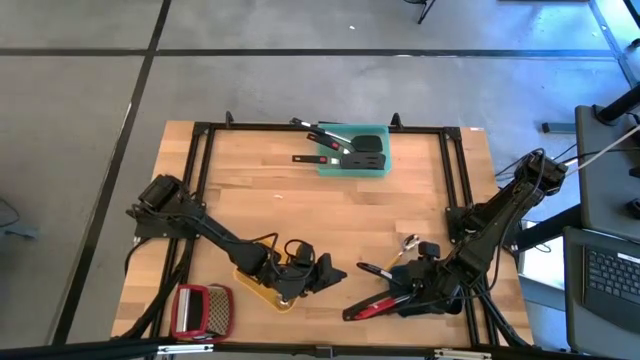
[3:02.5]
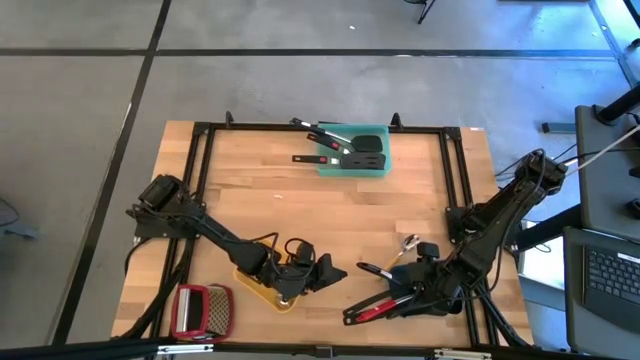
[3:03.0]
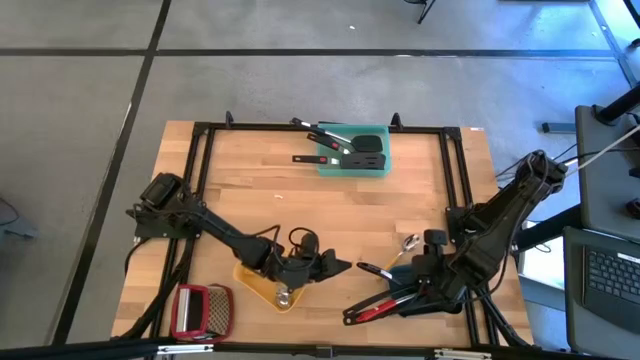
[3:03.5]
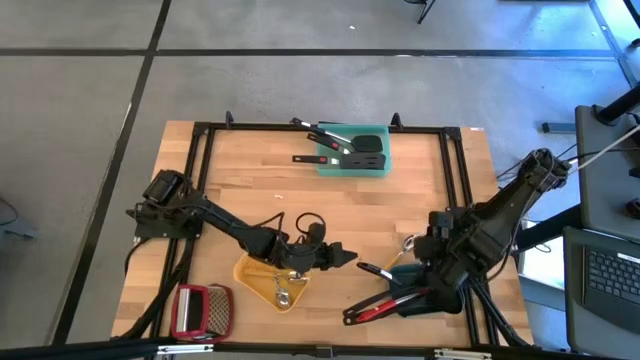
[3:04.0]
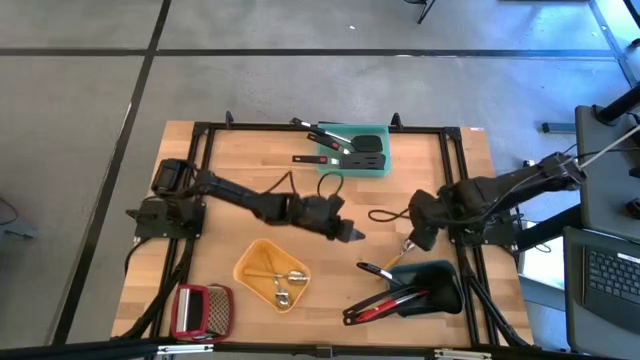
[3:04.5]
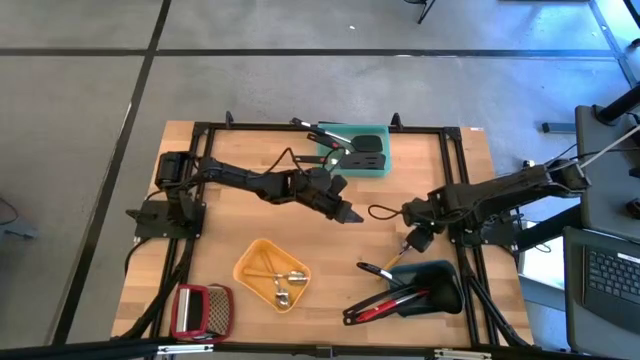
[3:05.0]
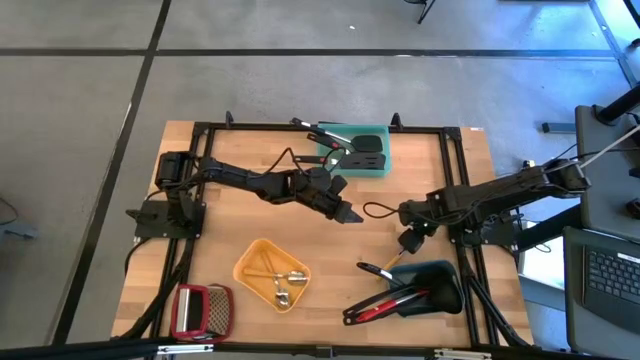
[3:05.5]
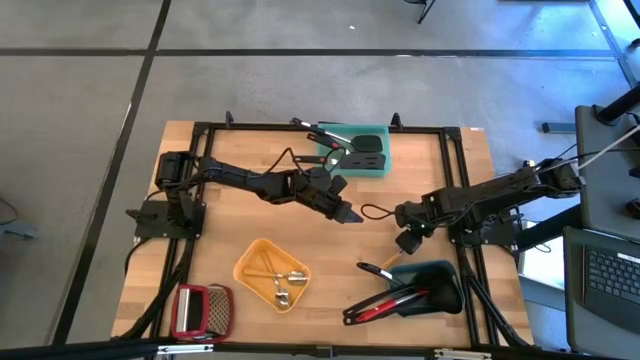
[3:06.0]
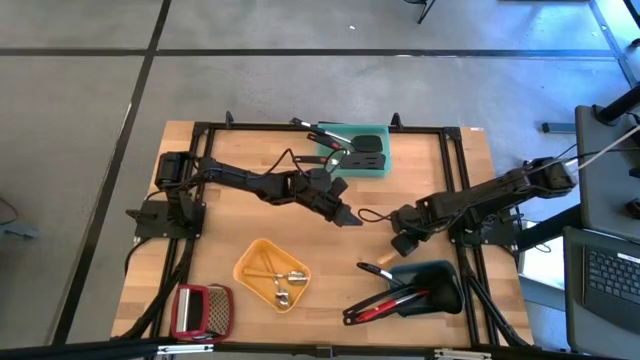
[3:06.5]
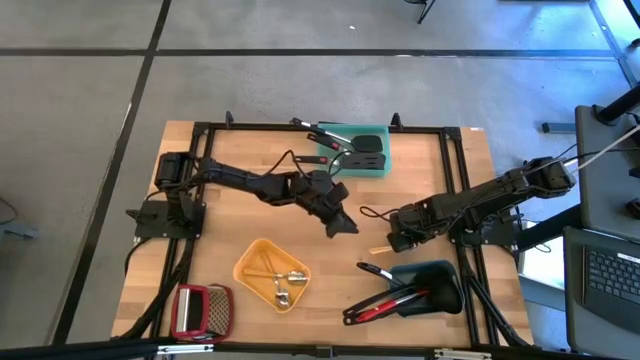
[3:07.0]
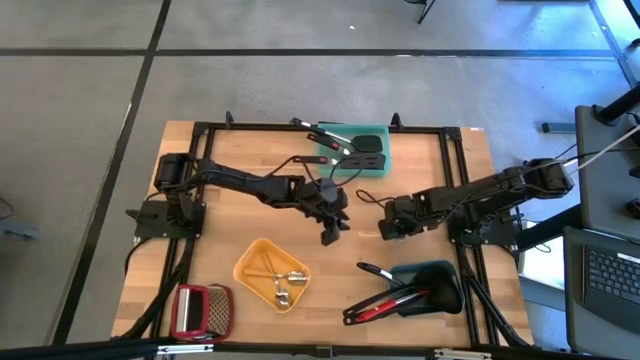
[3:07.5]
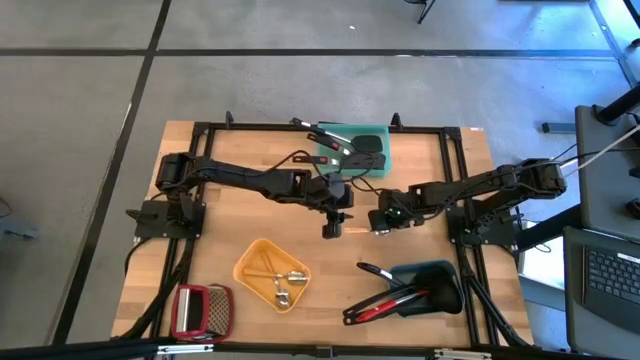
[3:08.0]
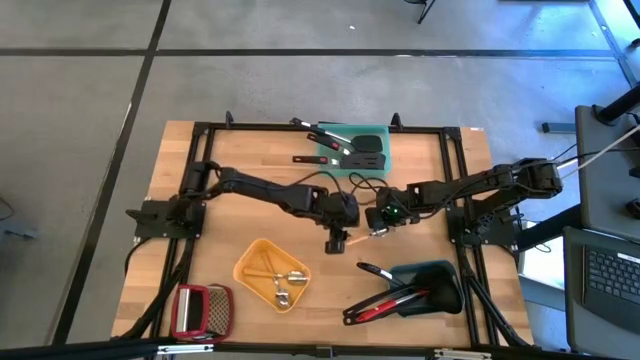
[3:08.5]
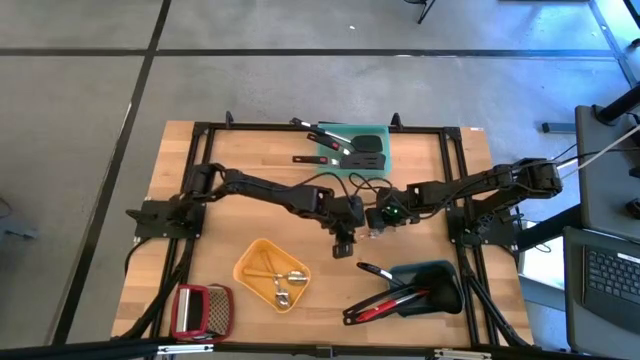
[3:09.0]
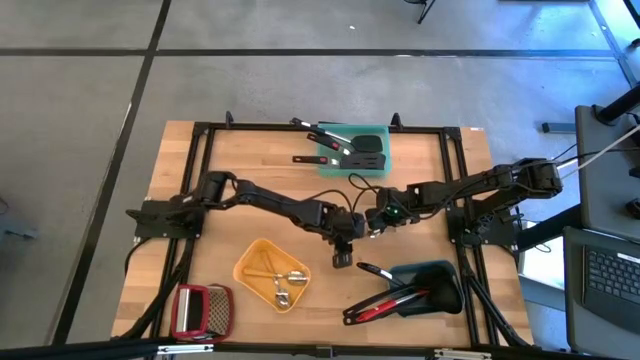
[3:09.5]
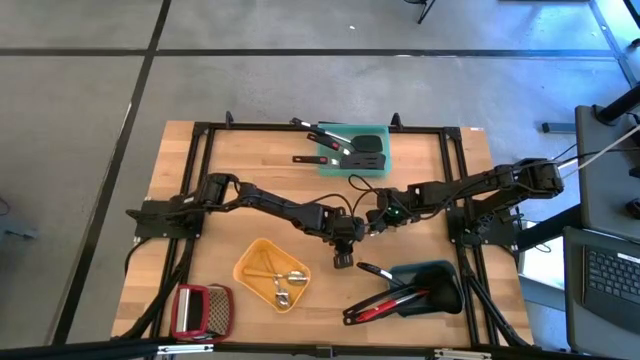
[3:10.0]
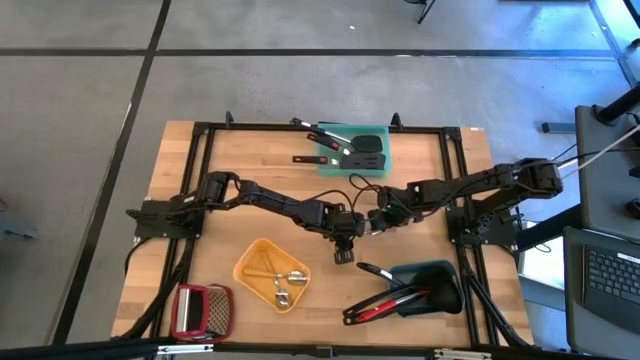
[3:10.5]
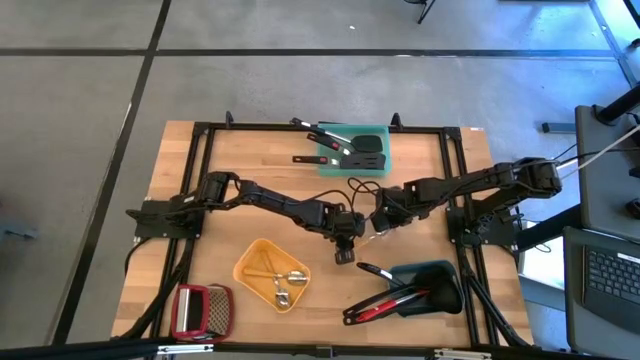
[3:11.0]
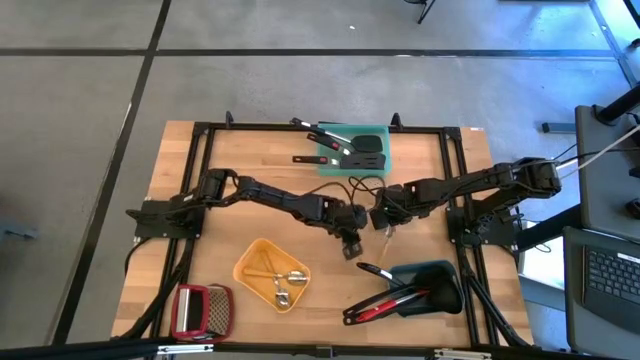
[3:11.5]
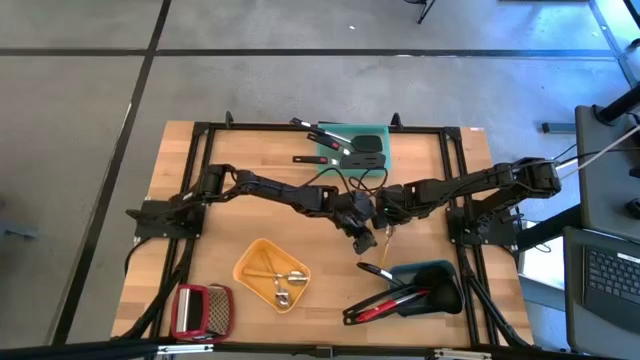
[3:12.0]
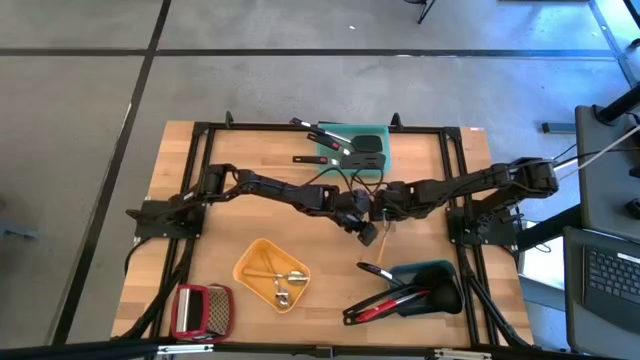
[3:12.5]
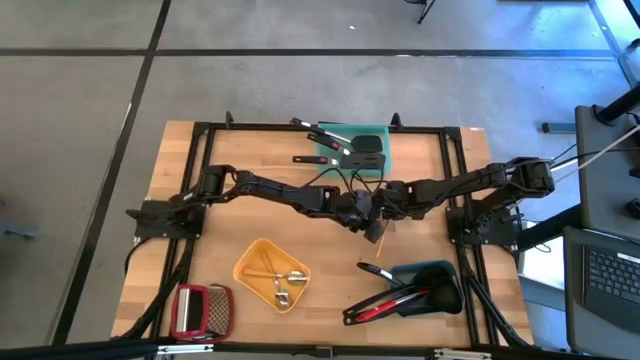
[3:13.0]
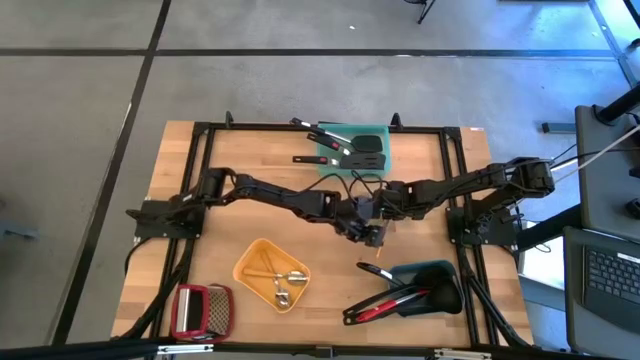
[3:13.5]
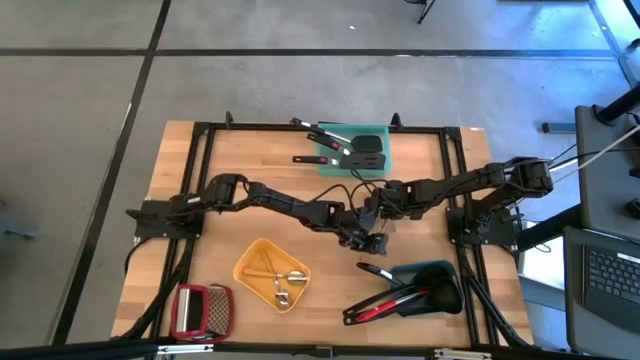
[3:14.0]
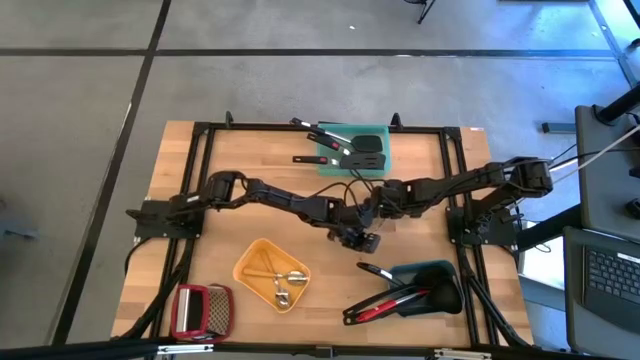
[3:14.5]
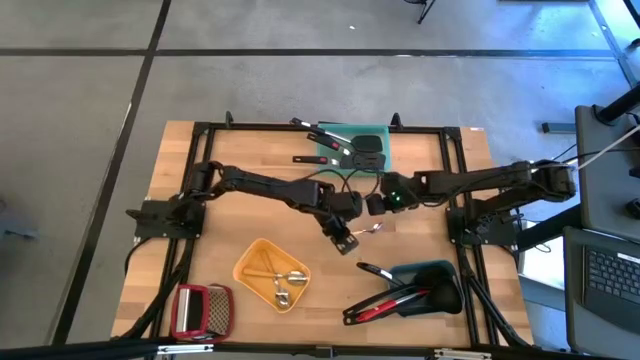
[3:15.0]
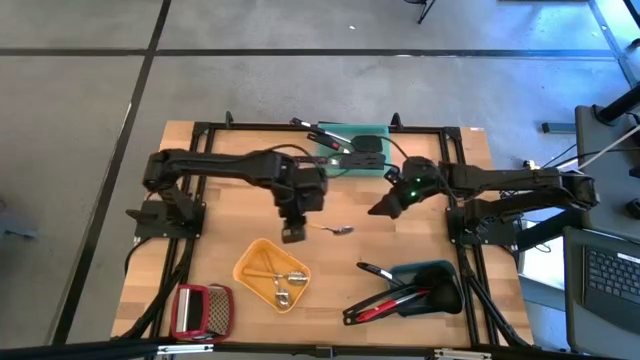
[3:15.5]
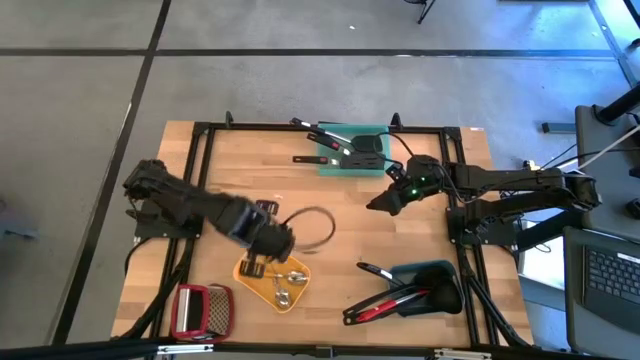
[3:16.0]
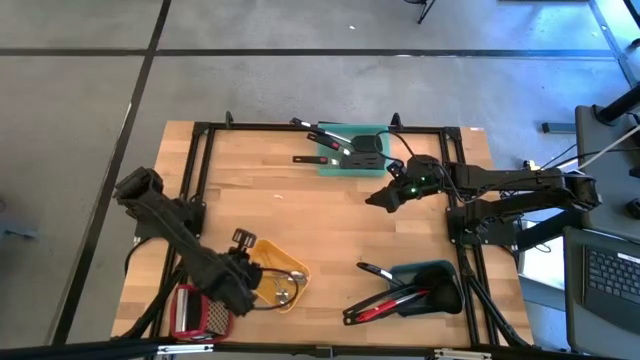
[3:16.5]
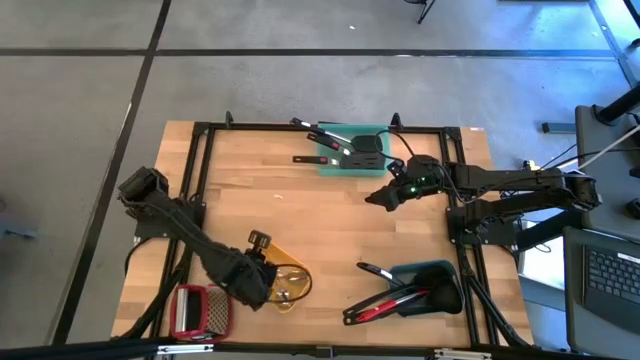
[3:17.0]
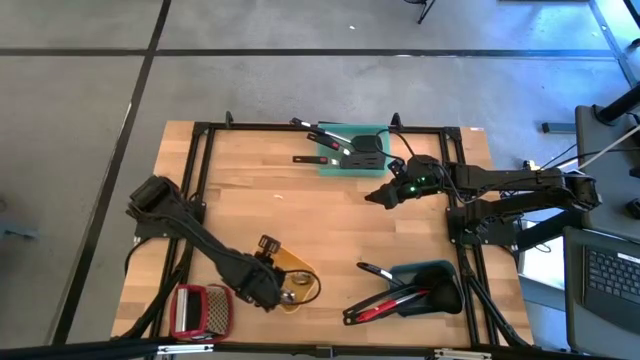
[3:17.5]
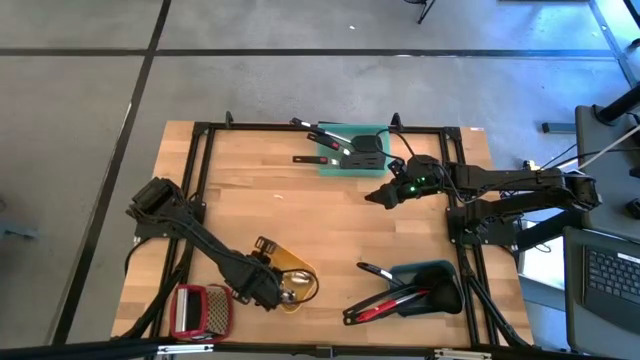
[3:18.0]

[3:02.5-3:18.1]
Task: Pick & Place Kitchen Items
Put the yellow spoon into the yellow bin

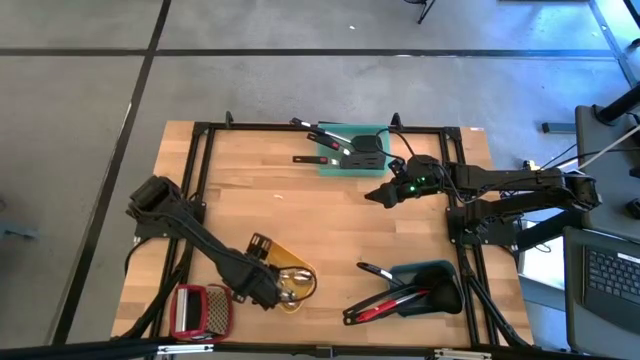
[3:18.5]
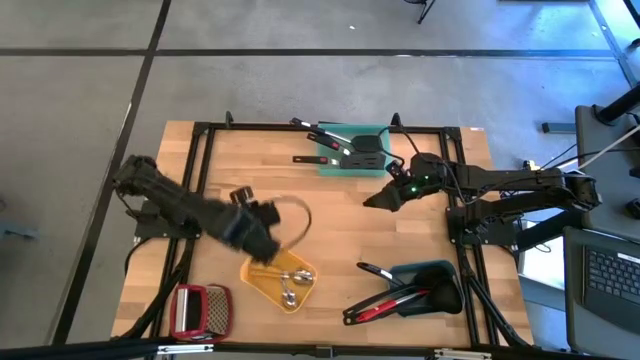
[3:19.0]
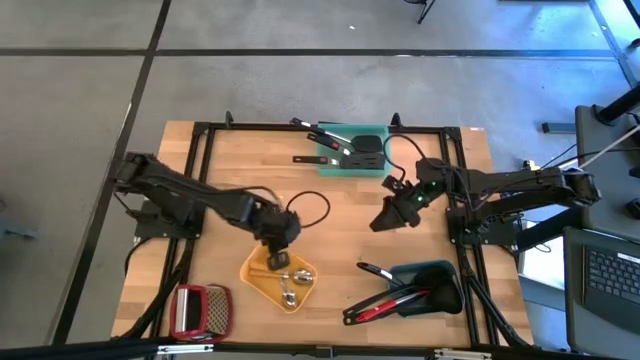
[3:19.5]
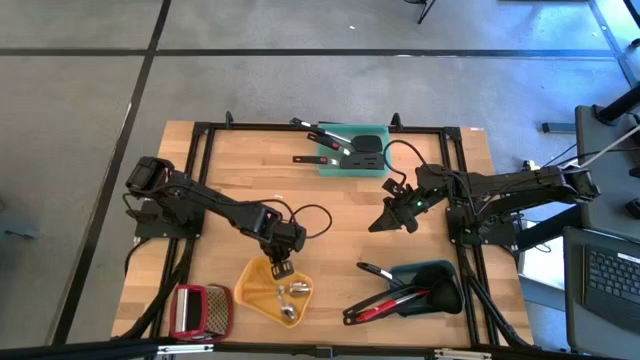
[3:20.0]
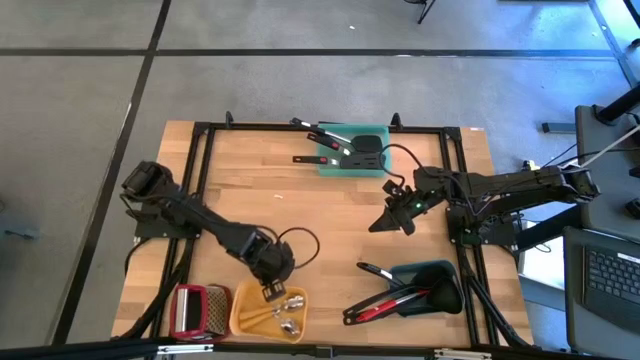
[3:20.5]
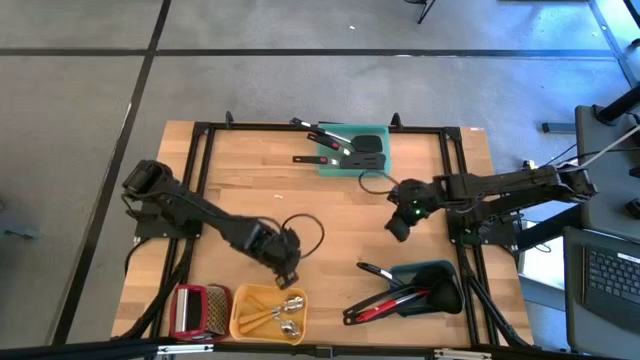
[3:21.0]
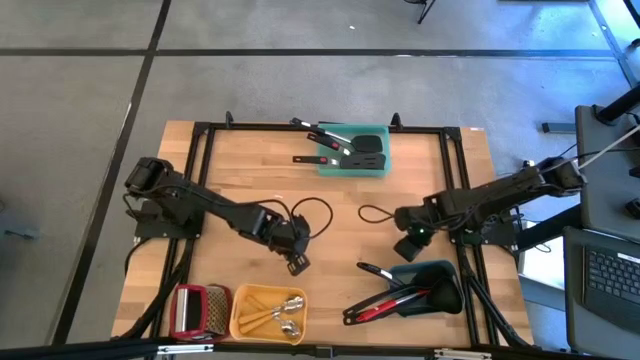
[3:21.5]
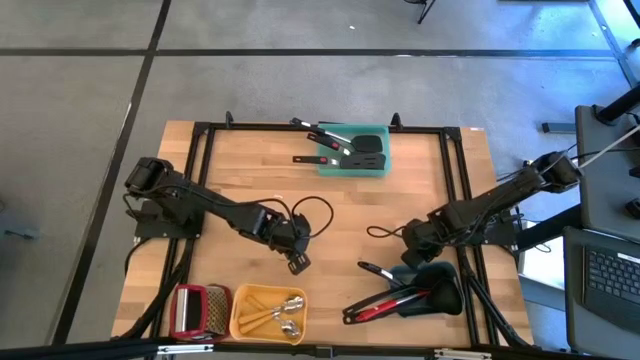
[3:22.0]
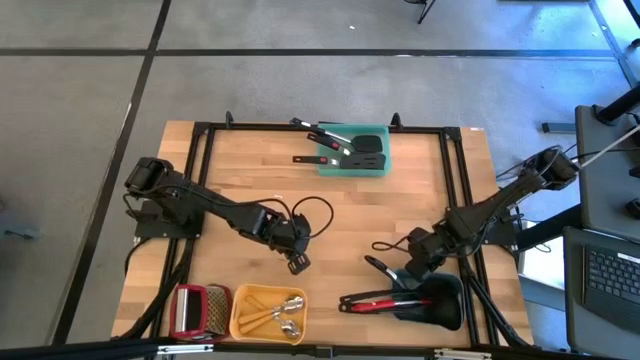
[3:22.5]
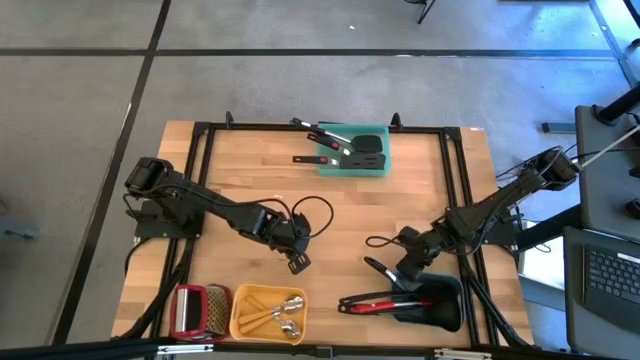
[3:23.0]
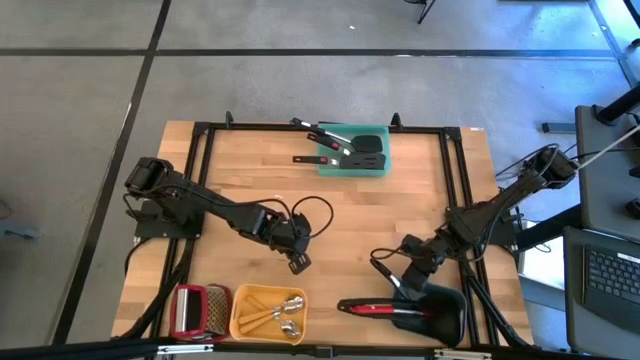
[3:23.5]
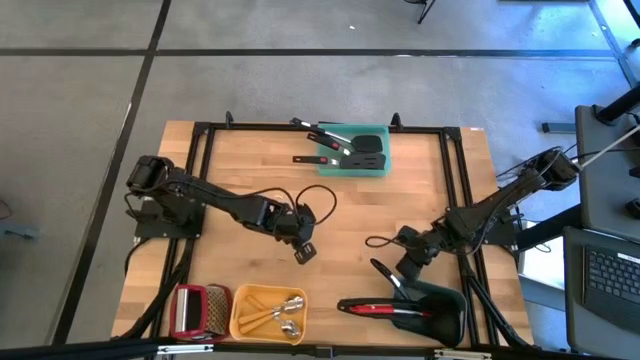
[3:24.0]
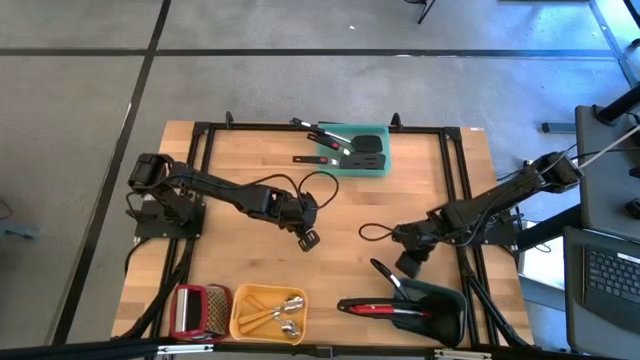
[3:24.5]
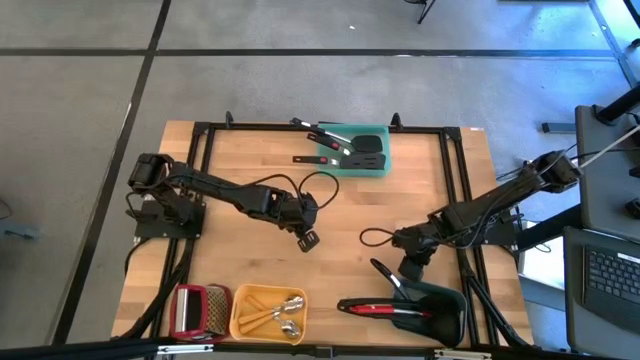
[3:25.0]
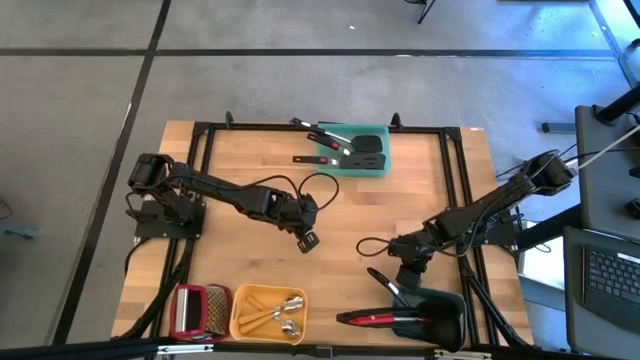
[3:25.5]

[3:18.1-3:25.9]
Adjust the yellow and blue bin
